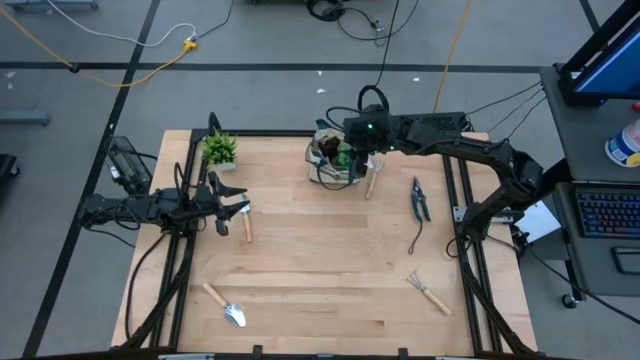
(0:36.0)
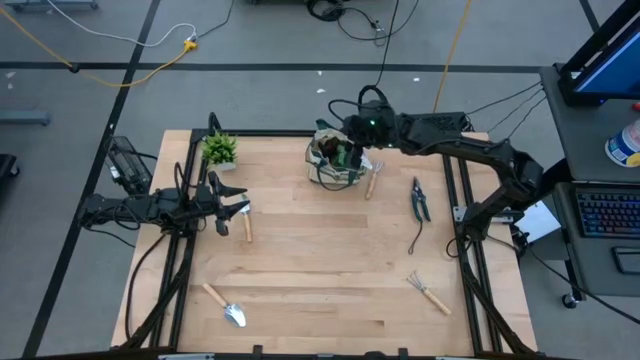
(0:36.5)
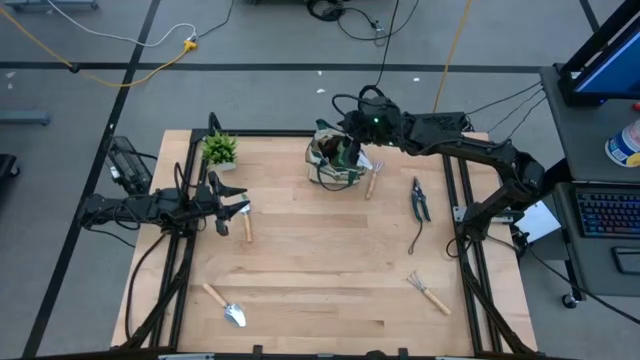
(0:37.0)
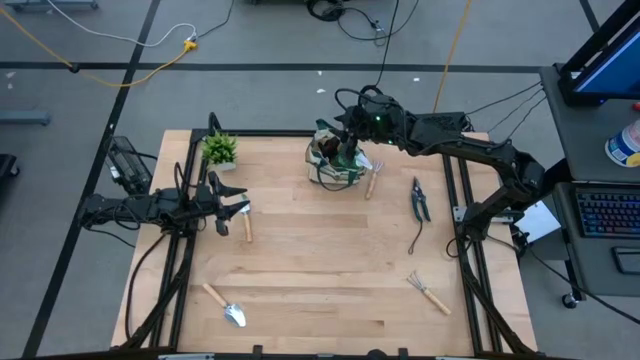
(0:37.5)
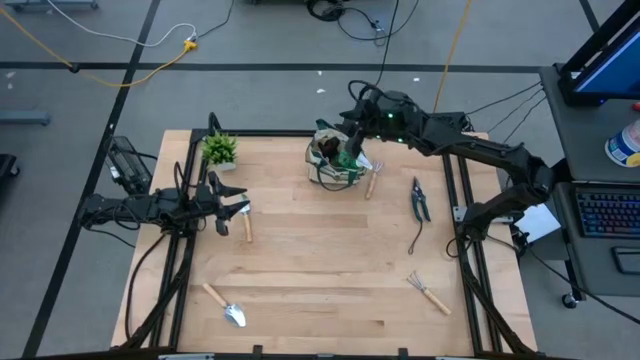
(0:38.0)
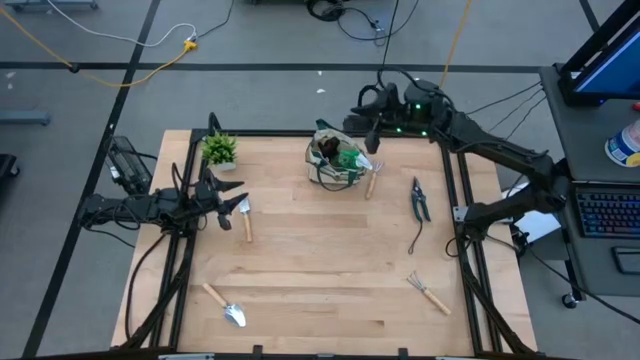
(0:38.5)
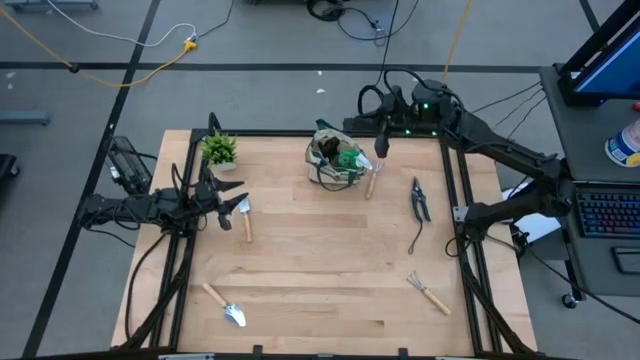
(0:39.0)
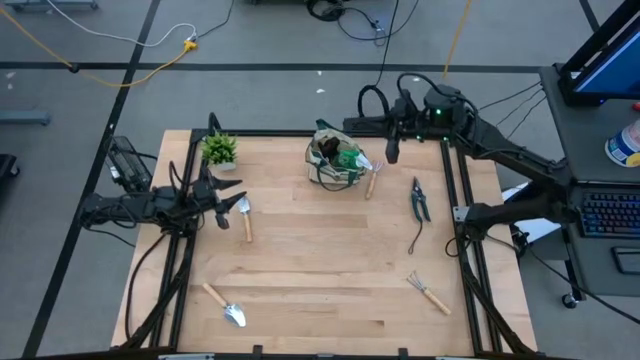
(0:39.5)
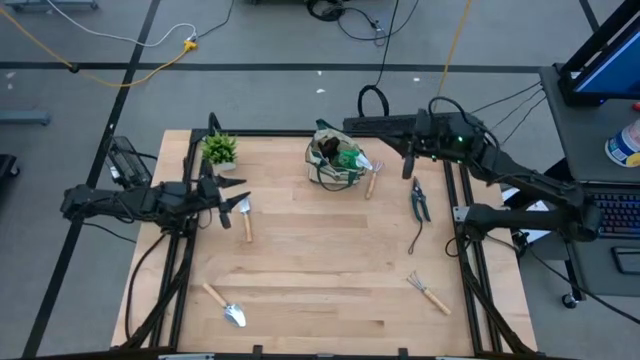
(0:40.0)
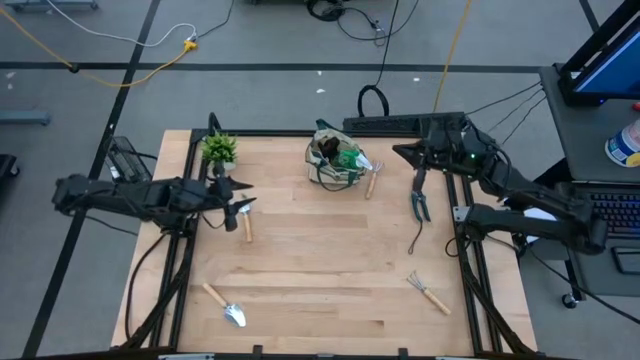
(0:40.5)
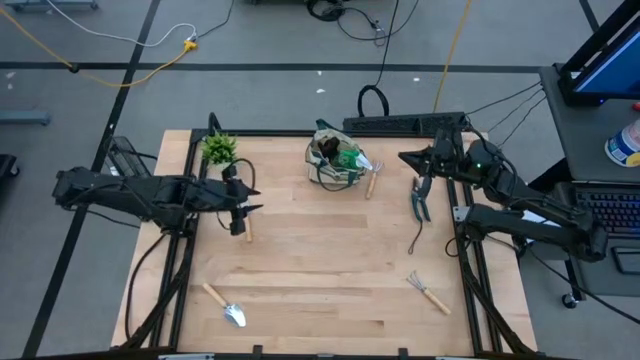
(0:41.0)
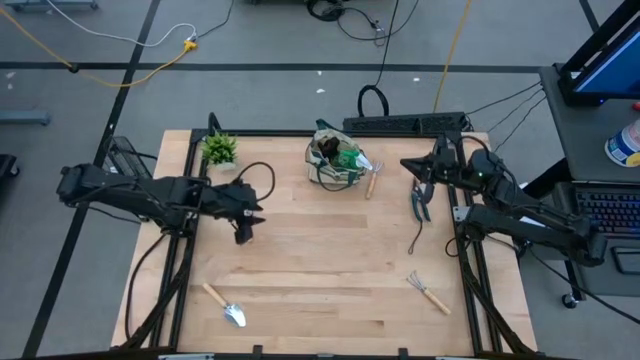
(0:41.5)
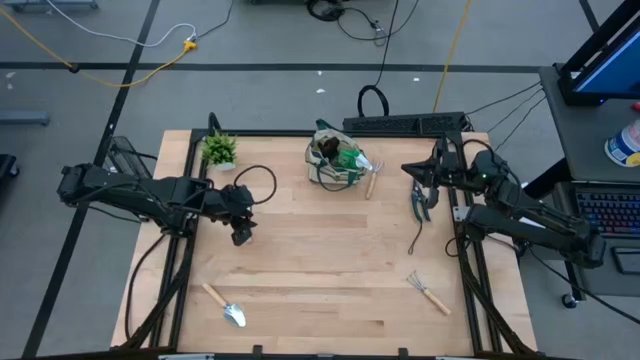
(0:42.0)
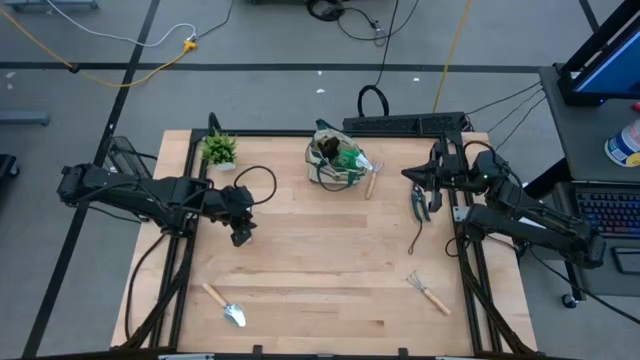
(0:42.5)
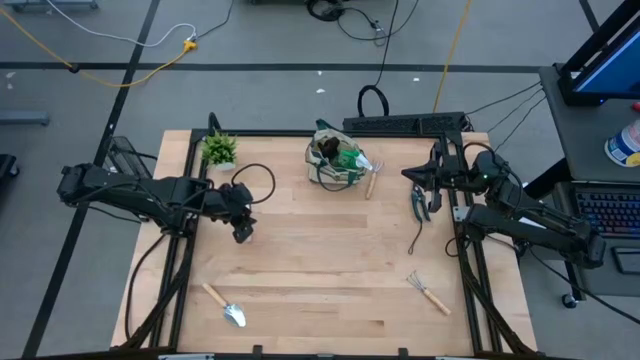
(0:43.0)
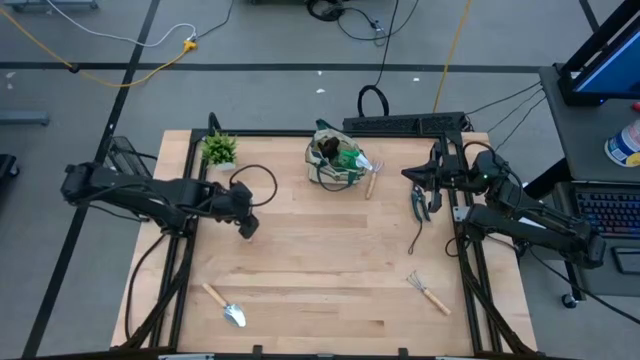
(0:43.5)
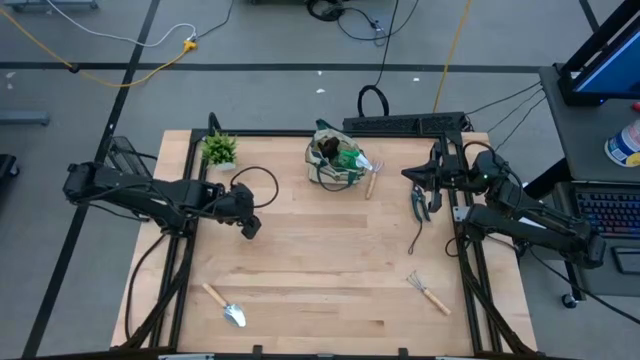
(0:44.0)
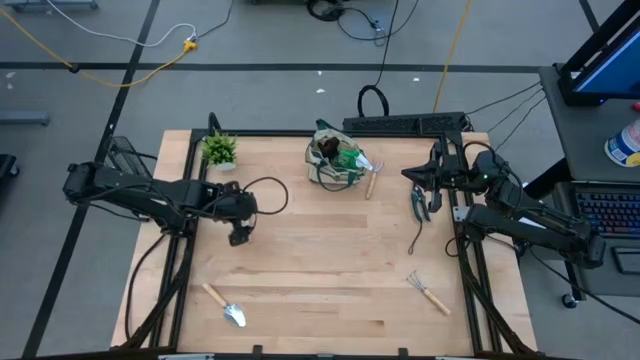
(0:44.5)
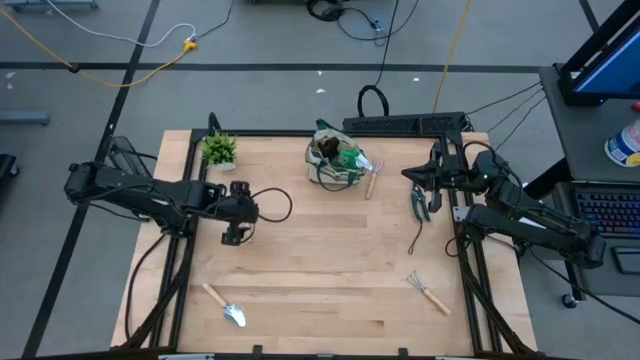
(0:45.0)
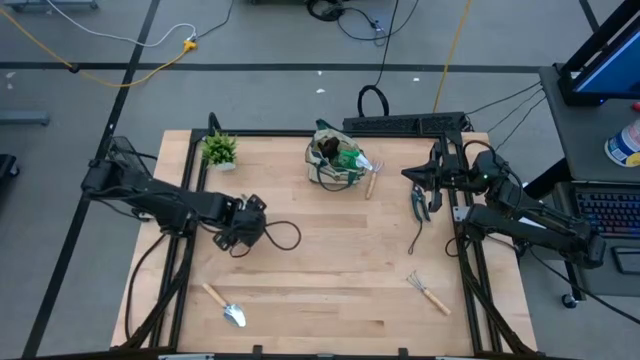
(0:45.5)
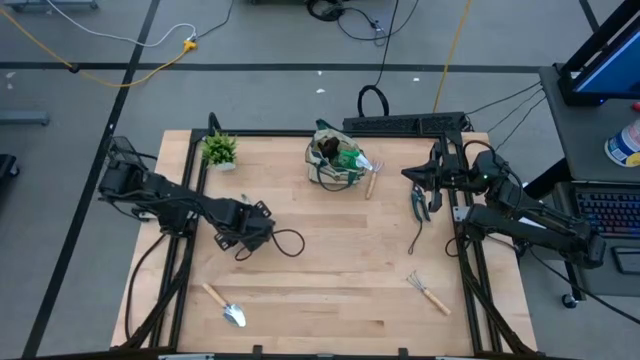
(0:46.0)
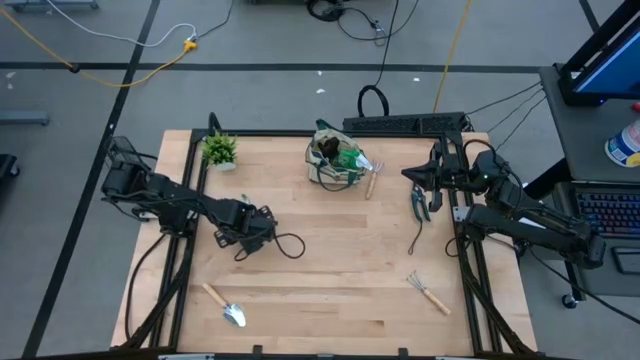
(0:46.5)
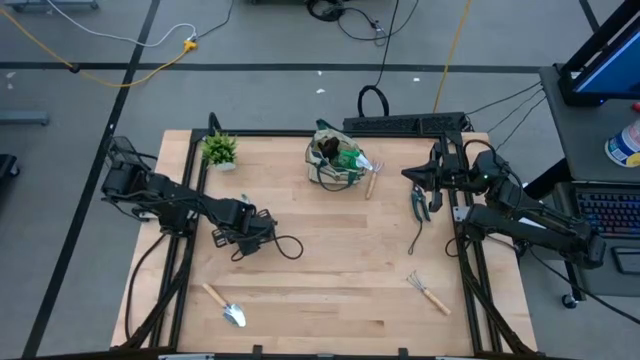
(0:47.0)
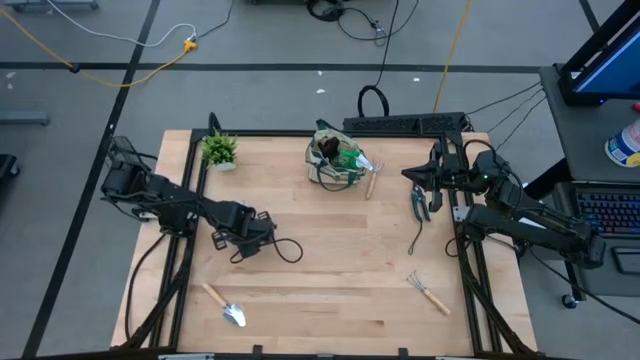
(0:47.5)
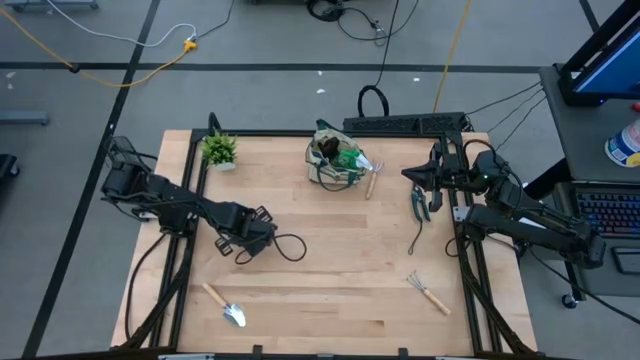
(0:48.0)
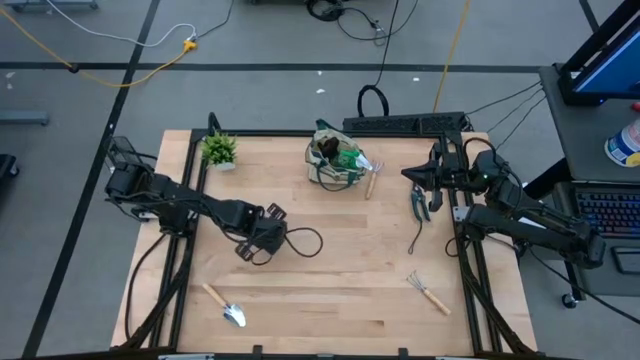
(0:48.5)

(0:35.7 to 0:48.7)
Task: Pick & Place Garden tools in Gardening bag
Put the top brown trowel into the gardening bag

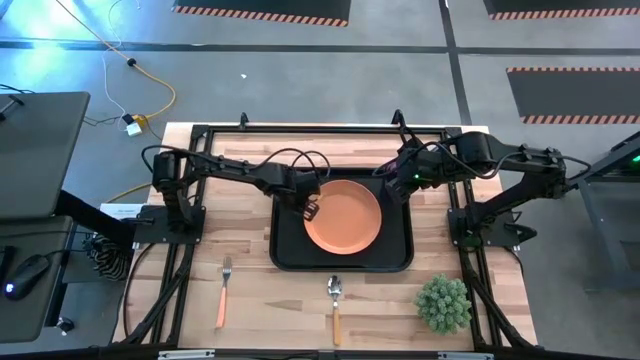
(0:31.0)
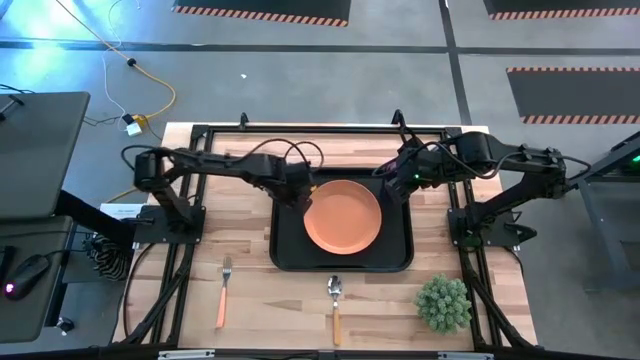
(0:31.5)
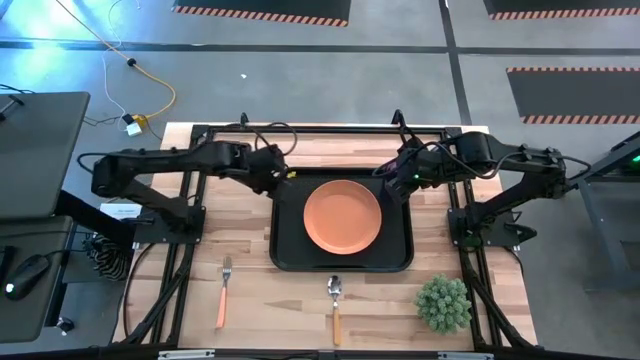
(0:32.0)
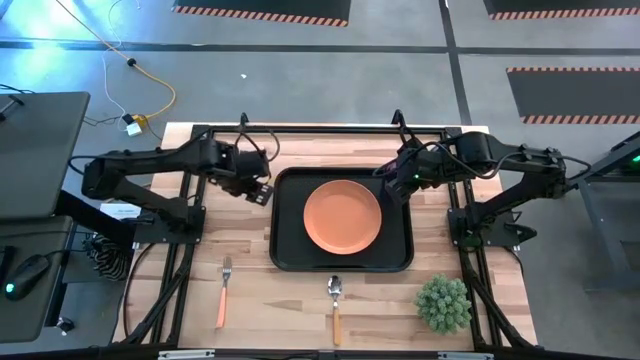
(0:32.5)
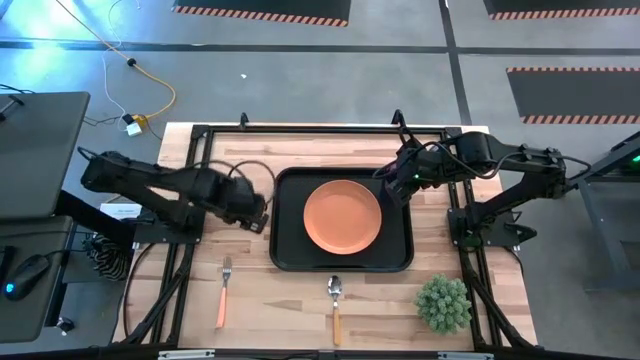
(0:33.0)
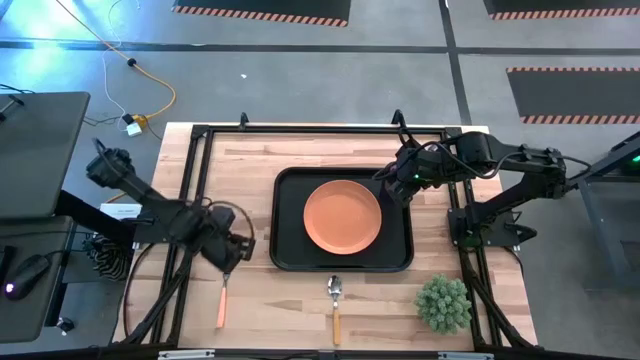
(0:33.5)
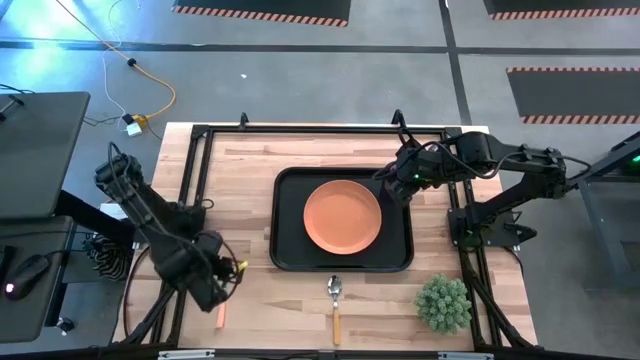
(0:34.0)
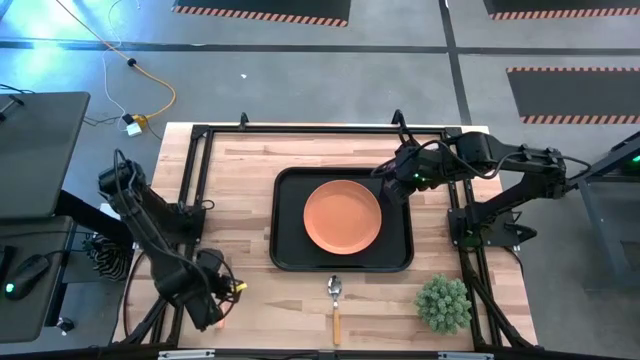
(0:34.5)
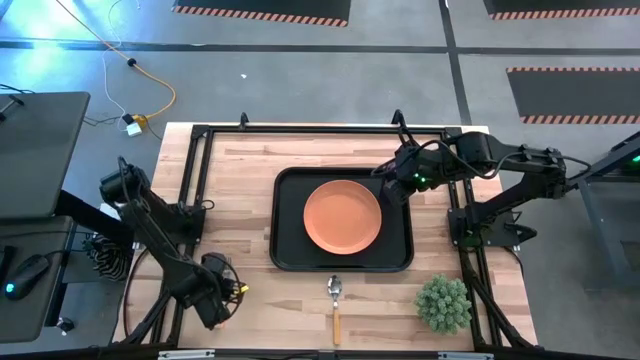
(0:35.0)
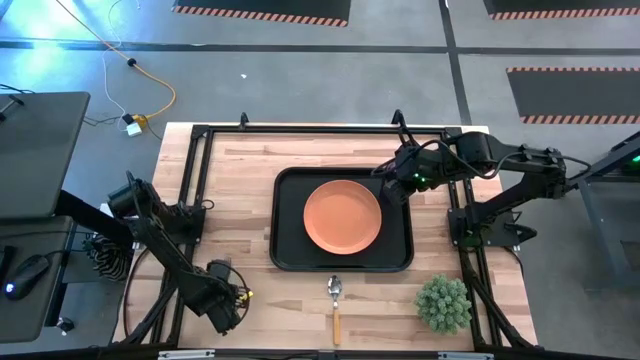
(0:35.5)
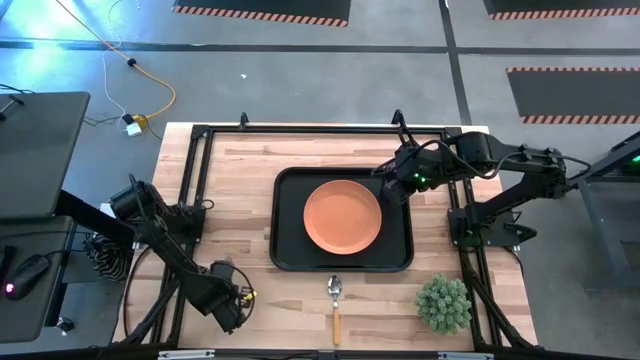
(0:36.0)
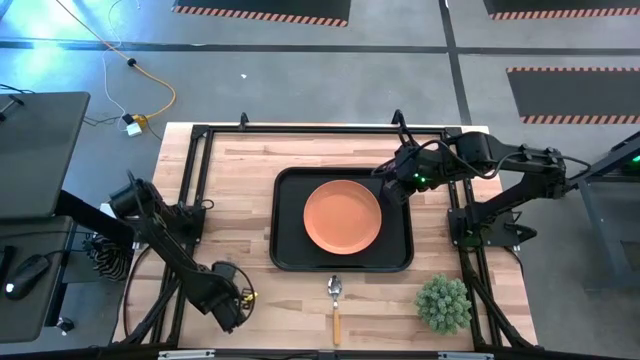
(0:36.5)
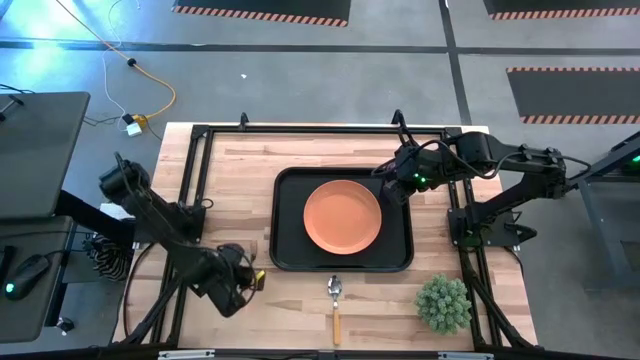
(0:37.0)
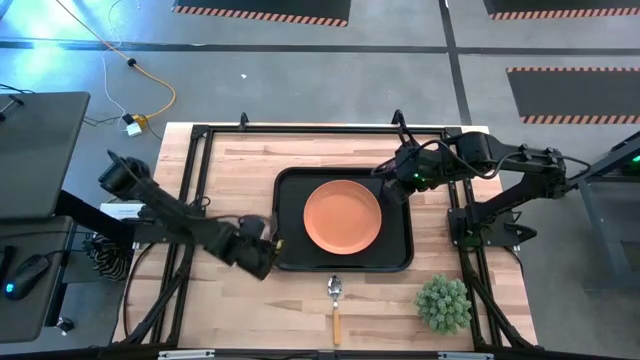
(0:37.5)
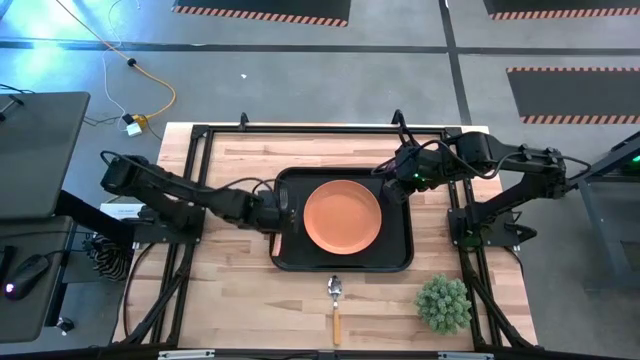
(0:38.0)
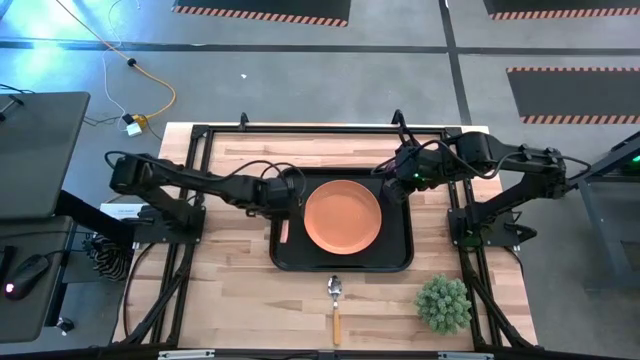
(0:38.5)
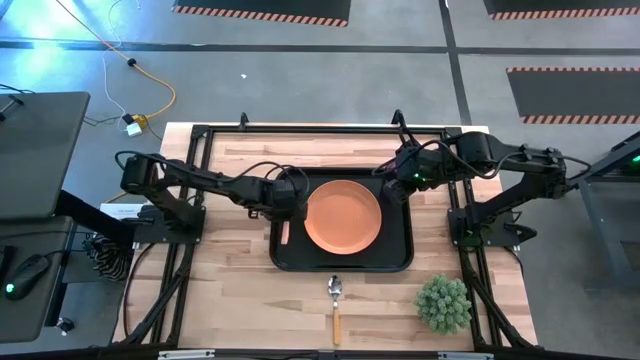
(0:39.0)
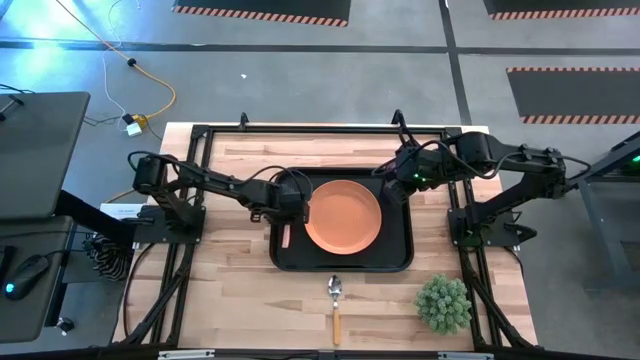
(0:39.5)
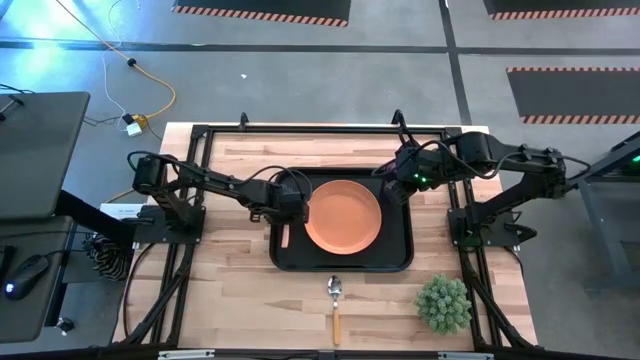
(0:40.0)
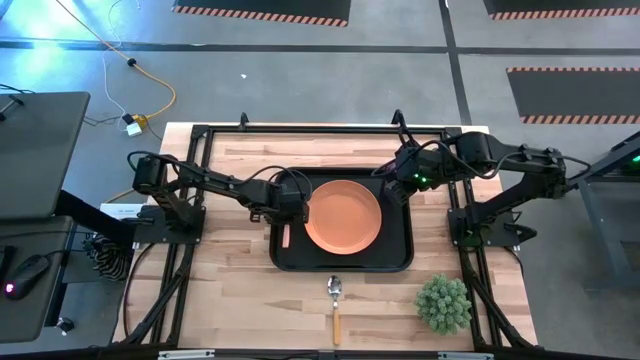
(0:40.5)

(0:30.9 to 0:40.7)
Task: Pick and place plate/cup/fork/spoon on tray
Put the orange fork on the black tray to the left of the orange plate
